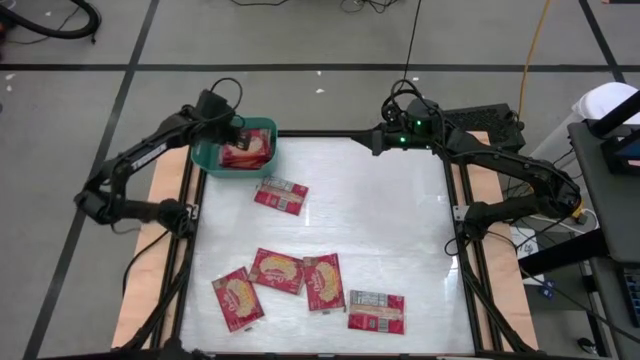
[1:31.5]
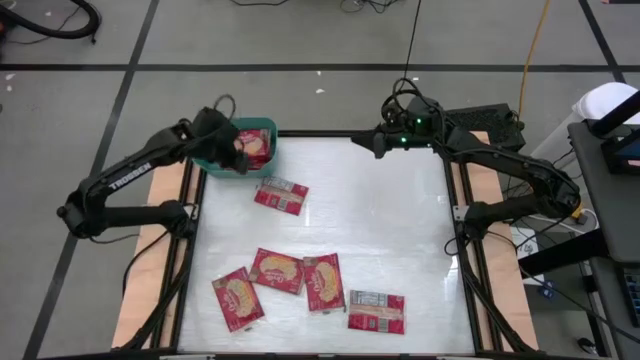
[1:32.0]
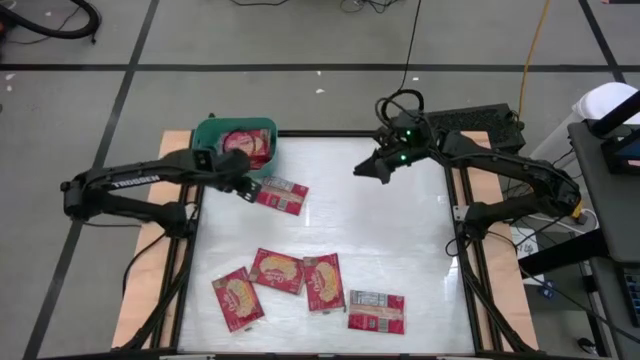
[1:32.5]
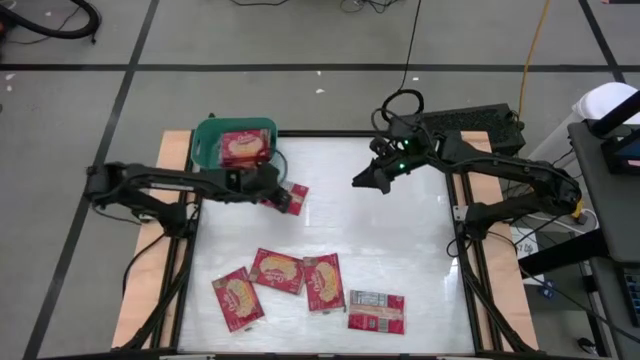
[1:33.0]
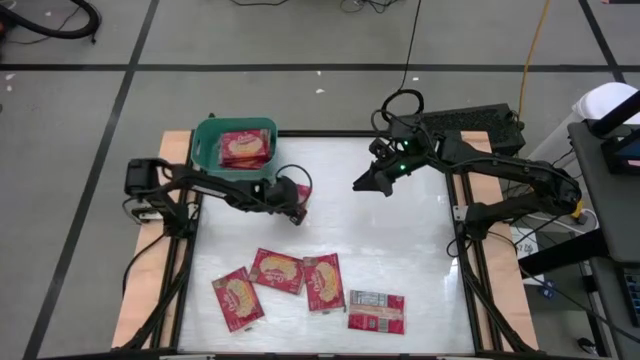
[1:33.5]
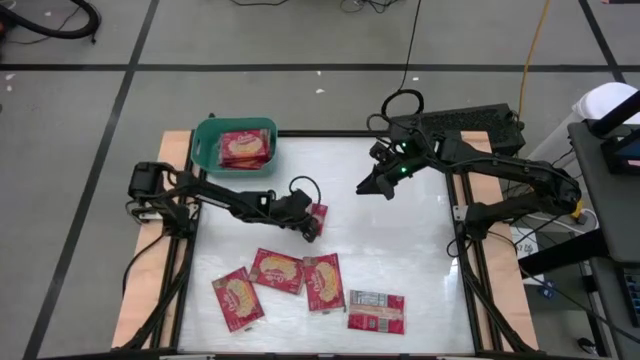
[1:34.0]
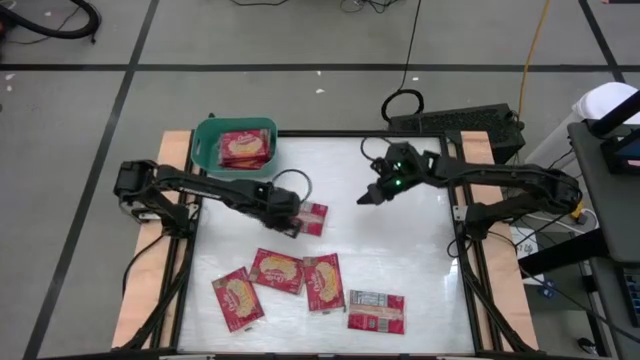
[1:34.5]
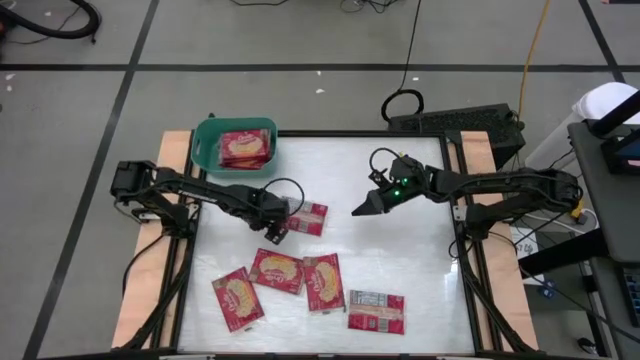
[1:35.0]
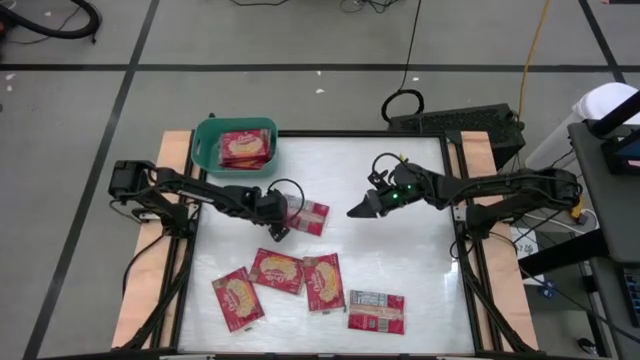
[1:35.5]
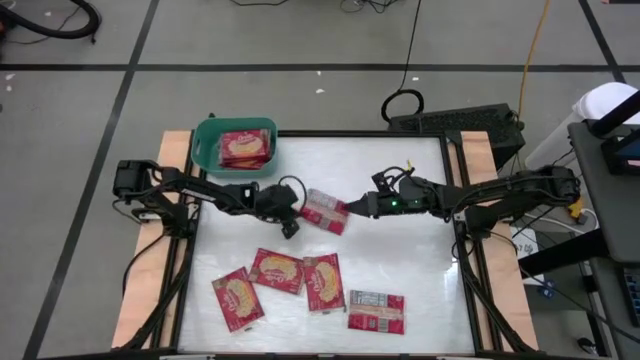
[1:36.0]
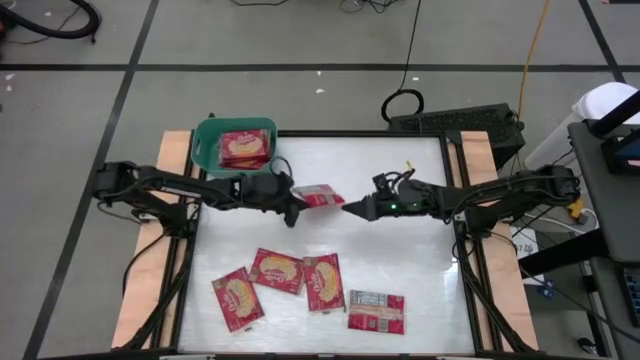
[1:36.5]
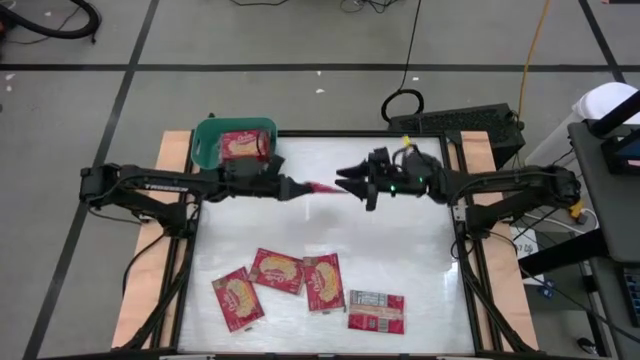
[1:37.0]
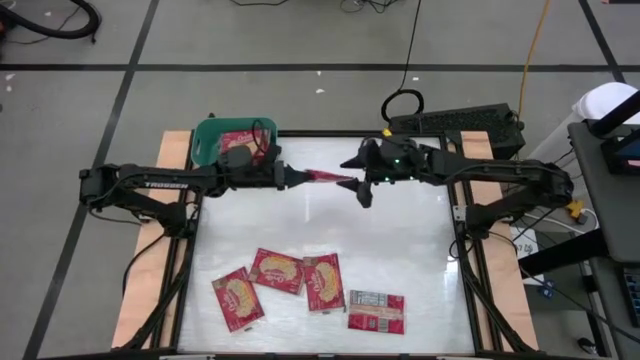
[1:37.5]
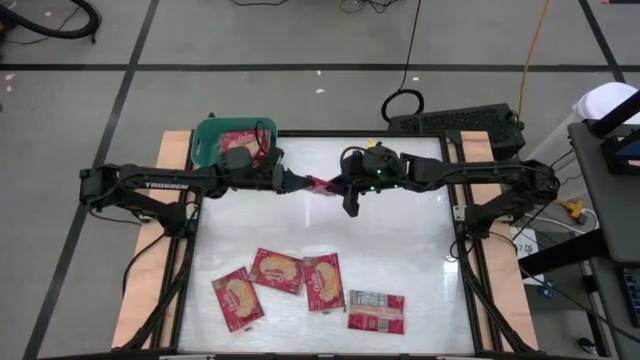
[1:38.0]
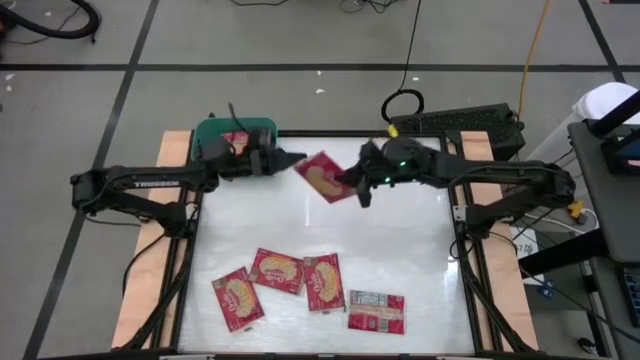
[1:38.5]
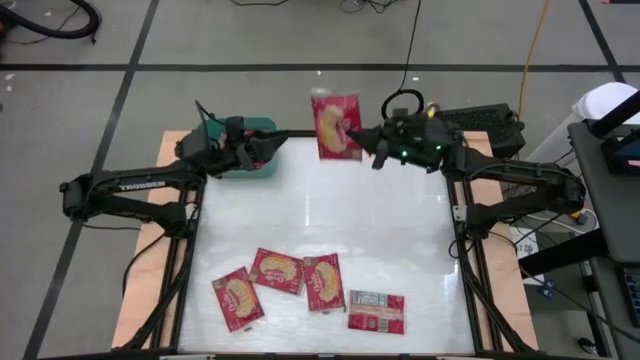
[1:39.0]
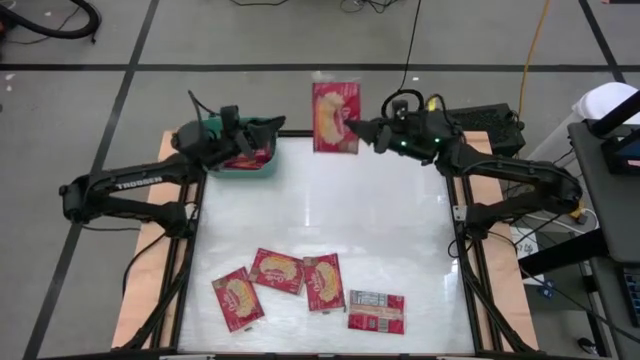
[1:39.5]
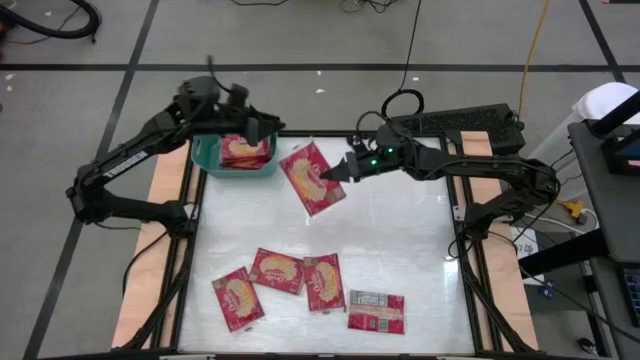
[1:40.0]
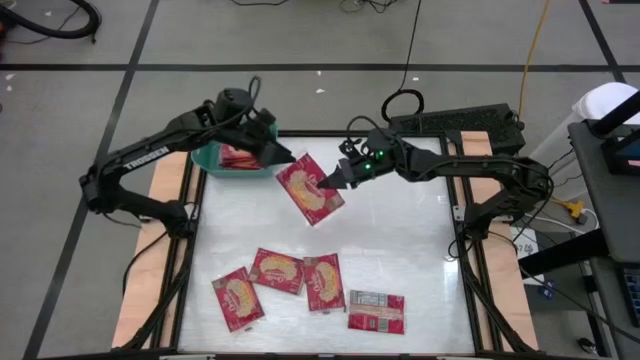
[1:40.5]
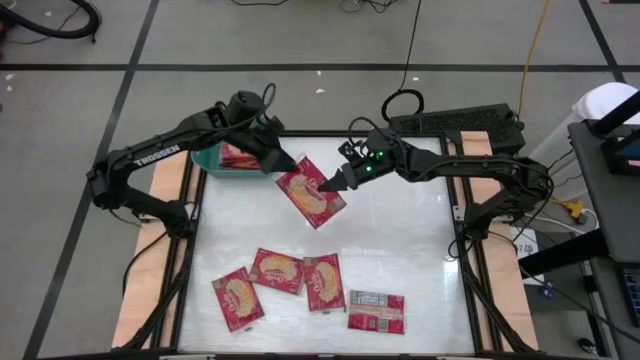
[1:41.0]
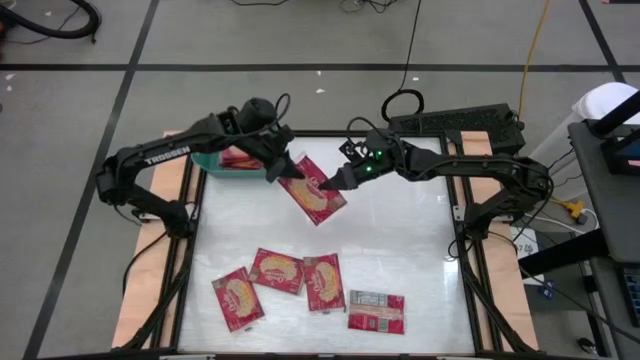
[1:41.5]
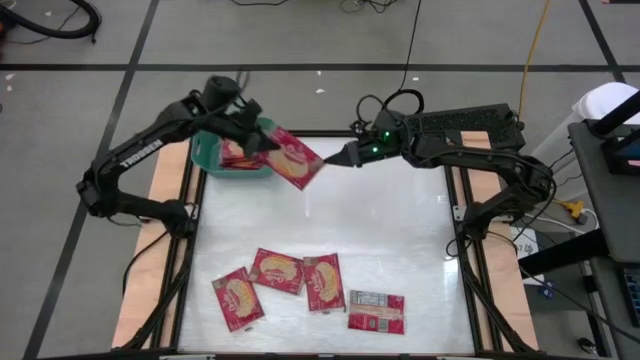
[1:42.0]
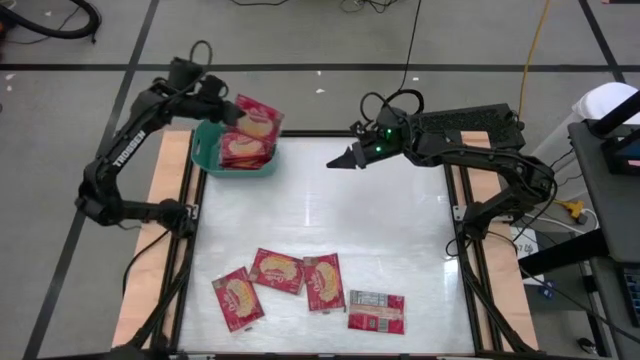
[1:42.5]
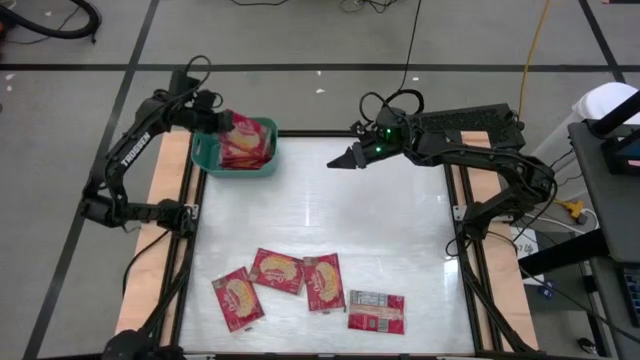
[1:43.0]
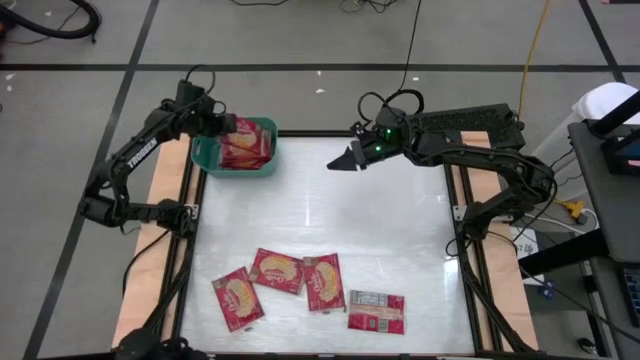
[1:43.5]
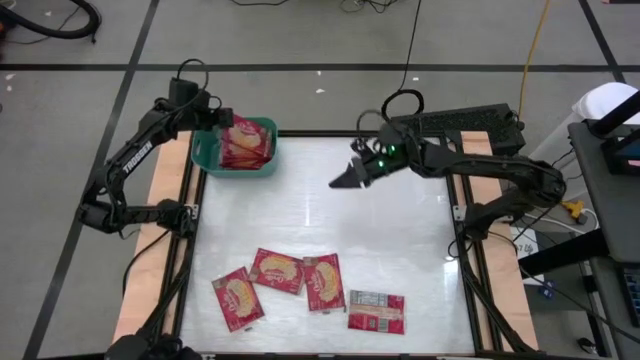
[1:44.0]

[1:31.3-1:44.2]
Task: Sort popcorn bags into baskets
Put the red popcorn bag into the green bin

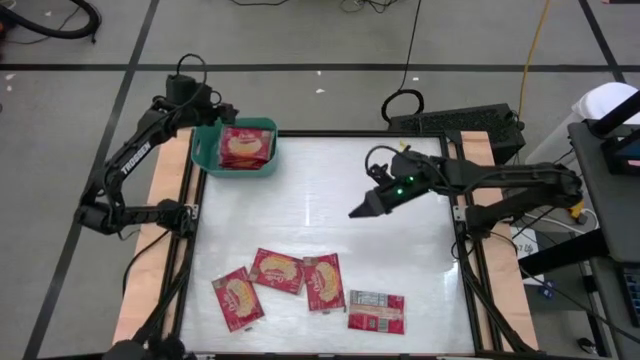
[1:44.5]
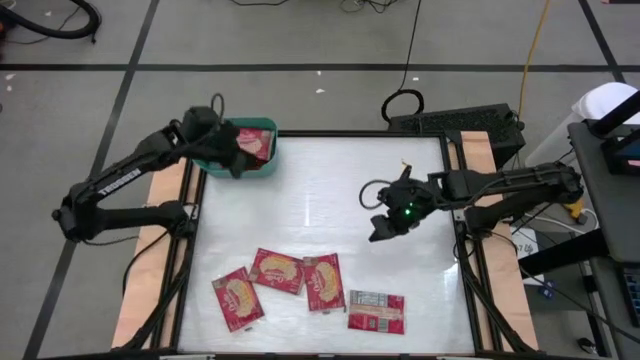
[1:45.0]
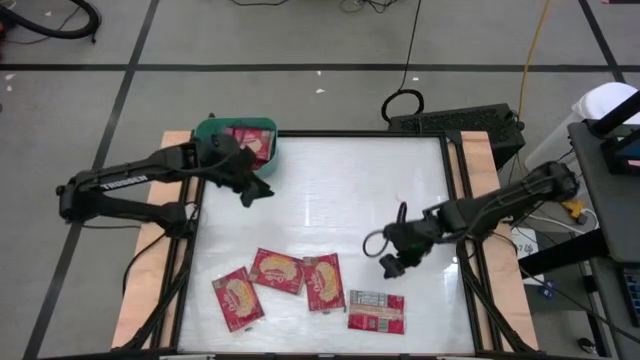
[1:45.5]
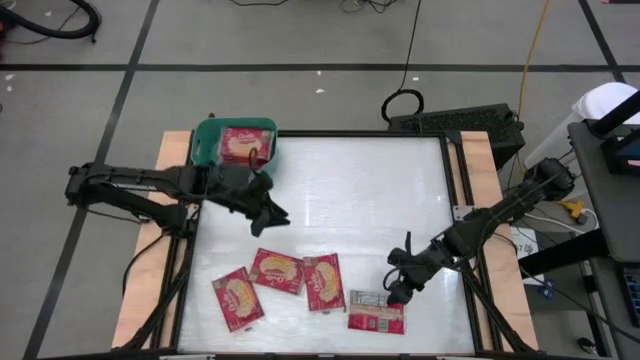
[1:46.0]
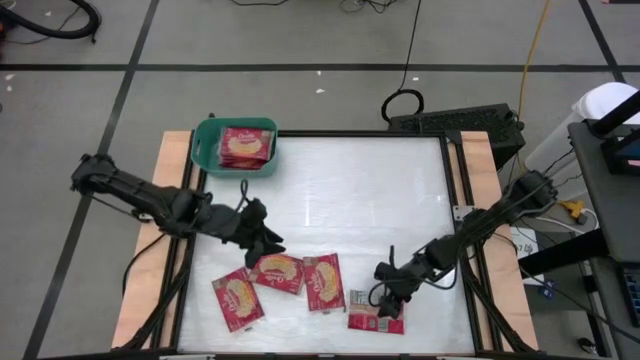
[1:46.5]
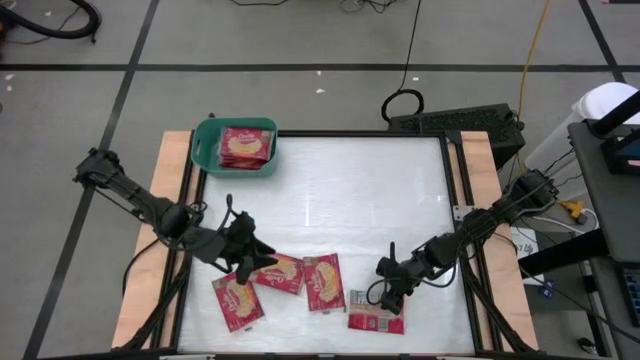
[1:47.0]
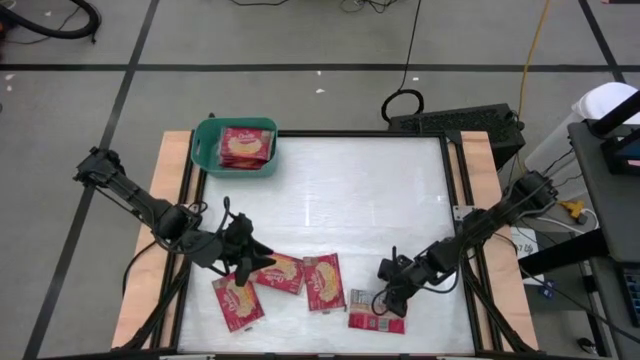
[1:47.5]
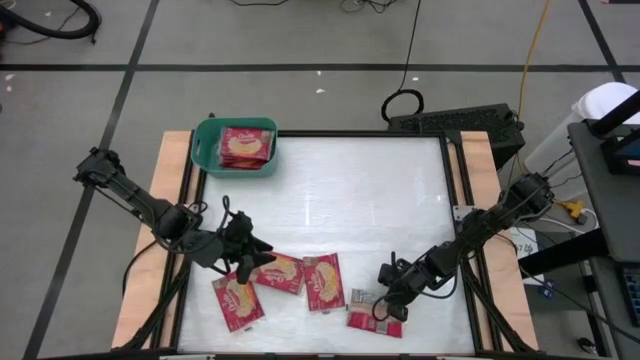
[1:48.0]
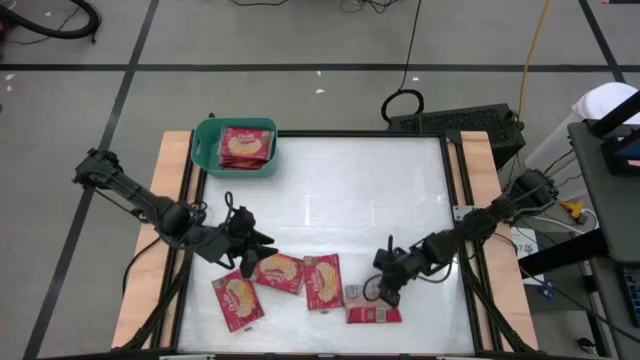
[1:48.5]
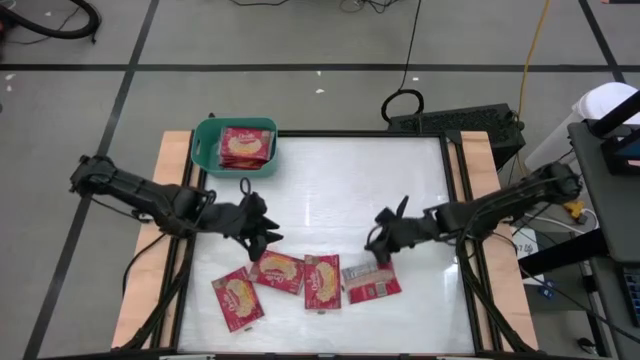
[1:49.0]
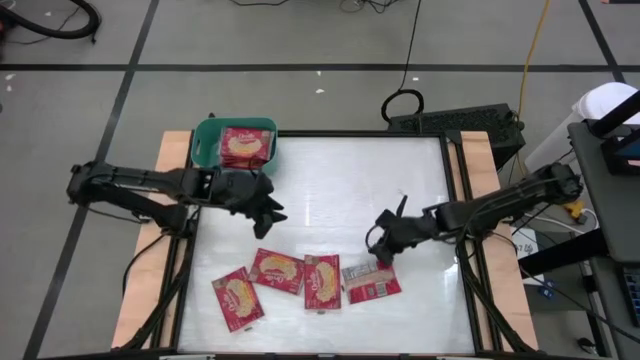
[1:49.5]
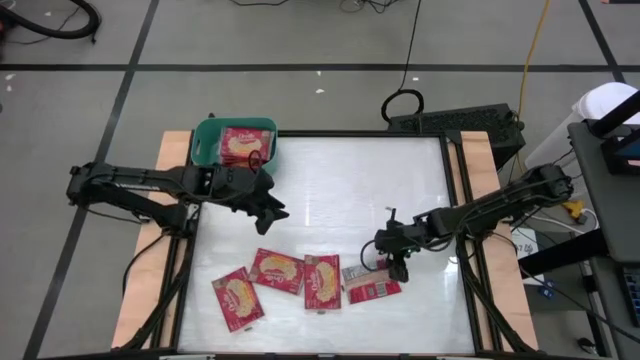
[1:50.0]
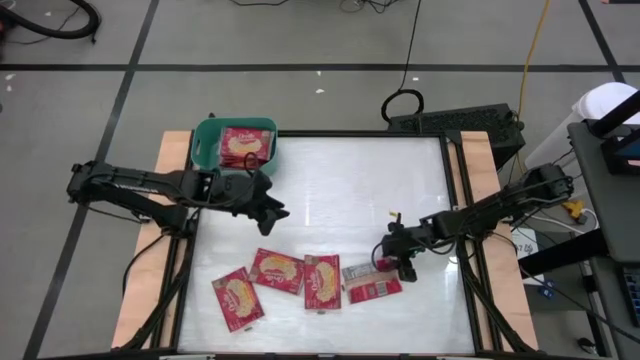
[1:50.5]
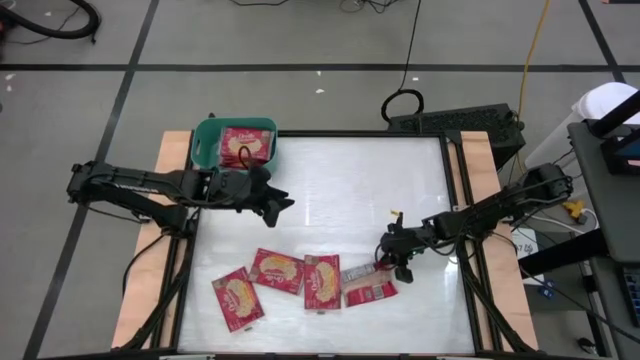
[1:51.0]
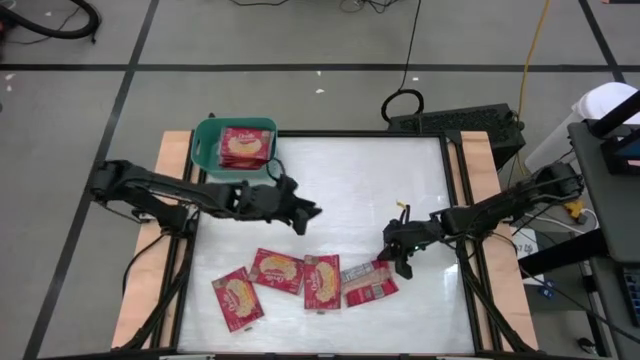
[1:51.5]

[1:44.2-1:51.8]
Put the red popcorn bag into the green bin
